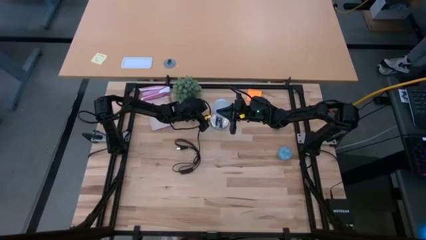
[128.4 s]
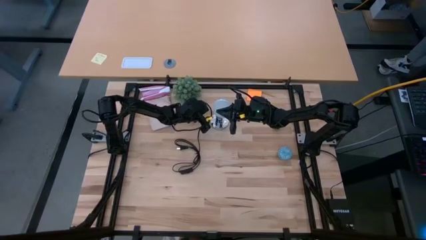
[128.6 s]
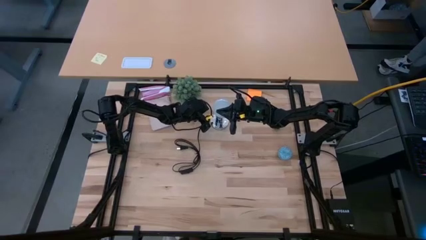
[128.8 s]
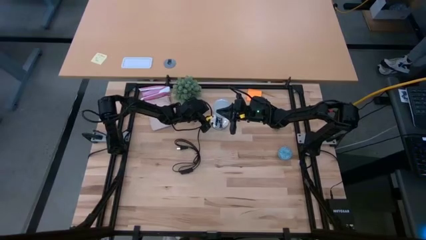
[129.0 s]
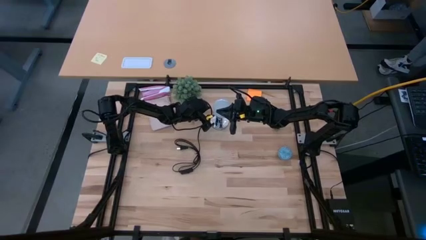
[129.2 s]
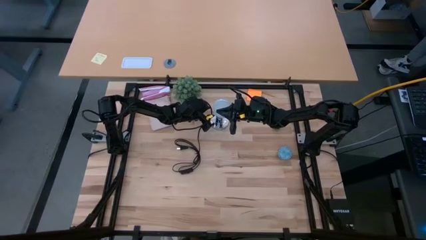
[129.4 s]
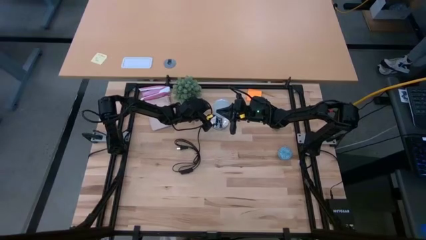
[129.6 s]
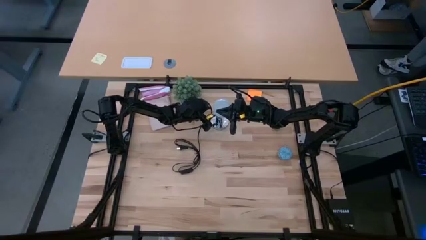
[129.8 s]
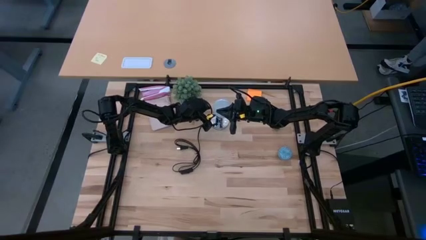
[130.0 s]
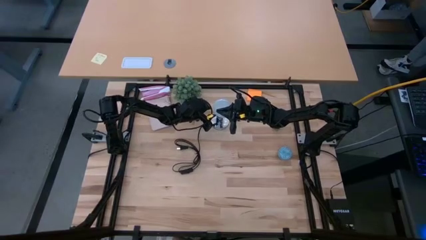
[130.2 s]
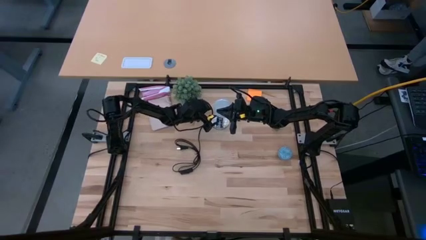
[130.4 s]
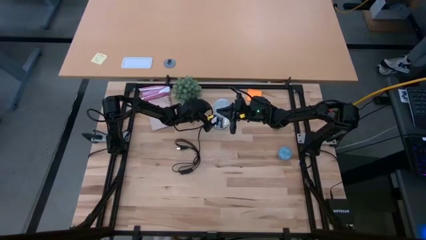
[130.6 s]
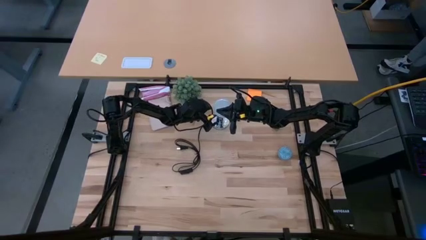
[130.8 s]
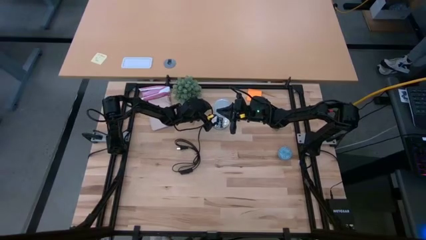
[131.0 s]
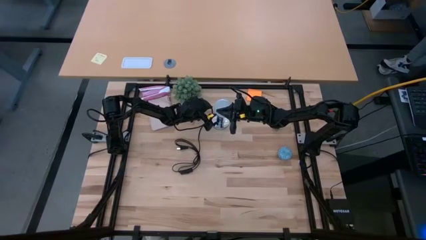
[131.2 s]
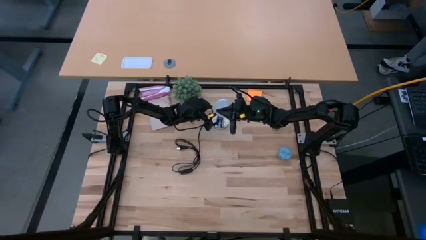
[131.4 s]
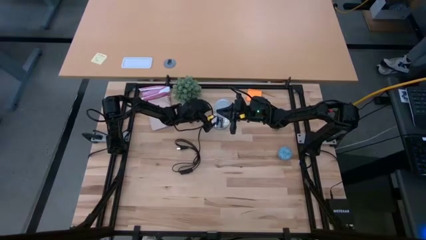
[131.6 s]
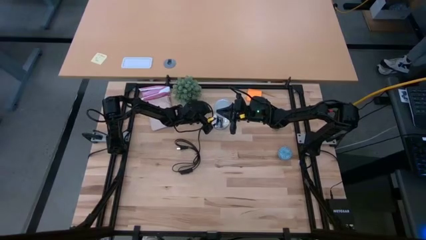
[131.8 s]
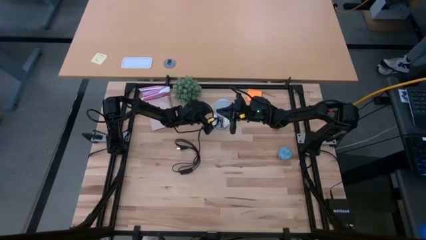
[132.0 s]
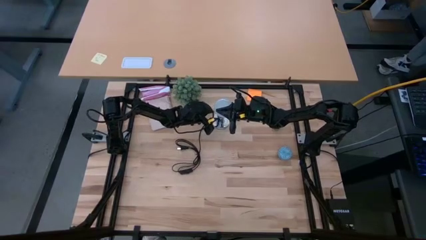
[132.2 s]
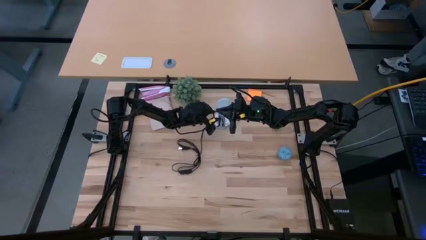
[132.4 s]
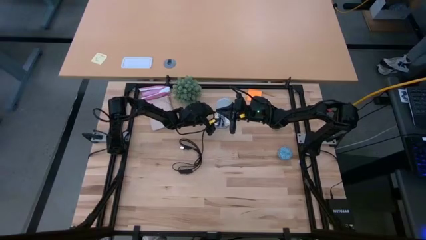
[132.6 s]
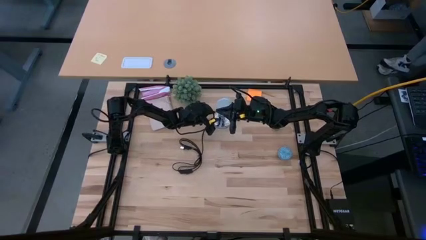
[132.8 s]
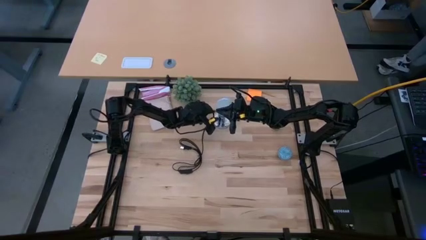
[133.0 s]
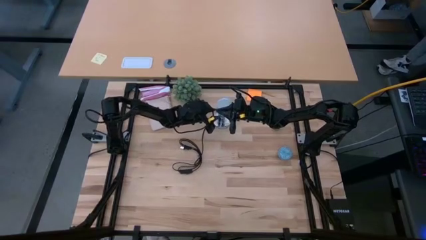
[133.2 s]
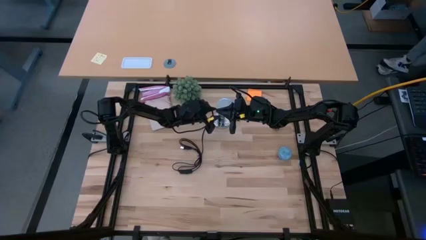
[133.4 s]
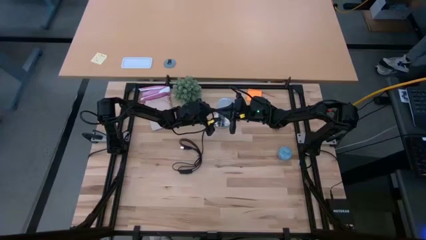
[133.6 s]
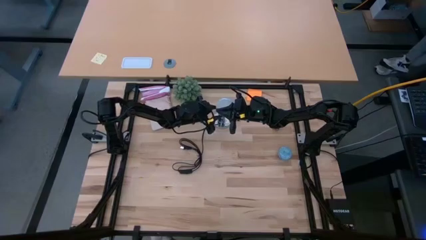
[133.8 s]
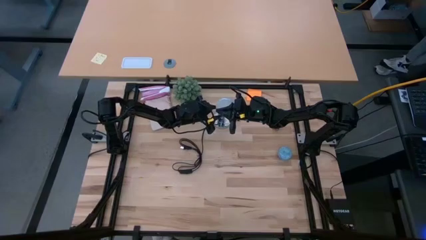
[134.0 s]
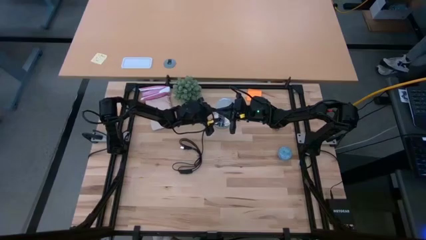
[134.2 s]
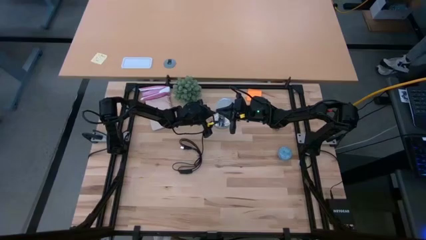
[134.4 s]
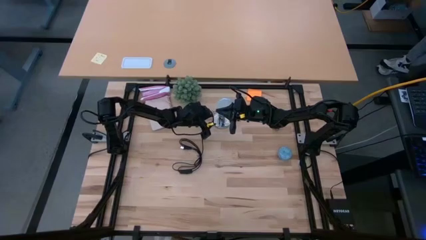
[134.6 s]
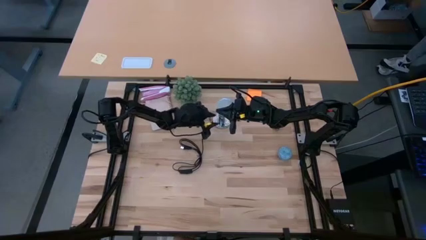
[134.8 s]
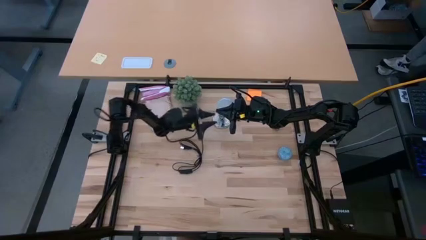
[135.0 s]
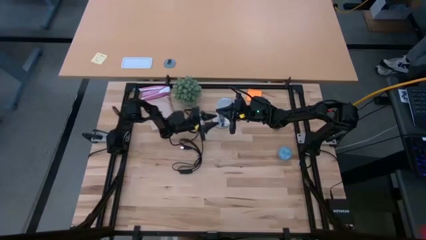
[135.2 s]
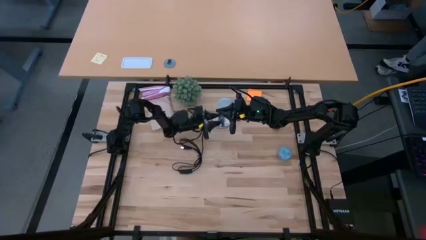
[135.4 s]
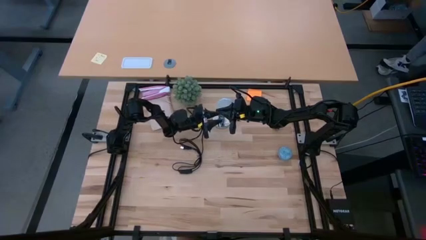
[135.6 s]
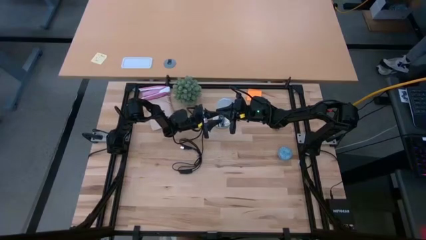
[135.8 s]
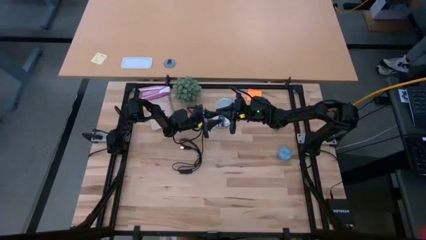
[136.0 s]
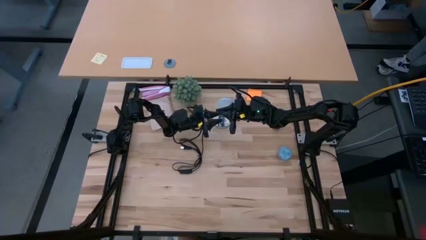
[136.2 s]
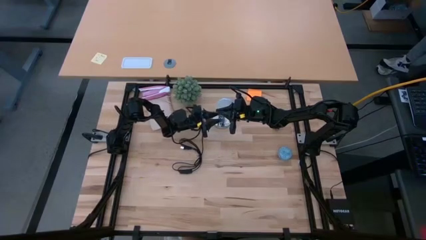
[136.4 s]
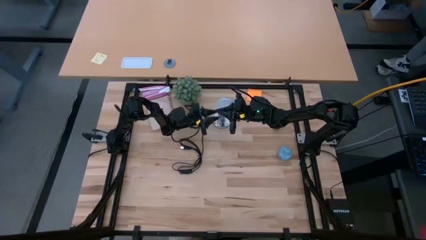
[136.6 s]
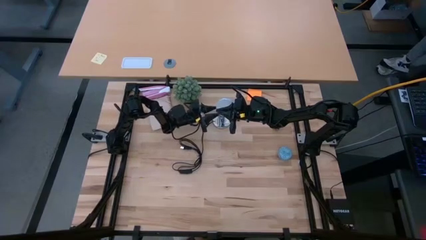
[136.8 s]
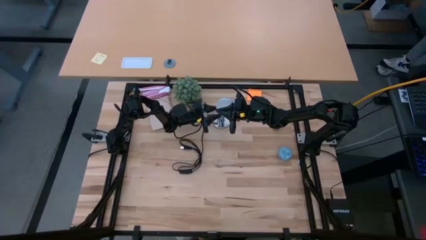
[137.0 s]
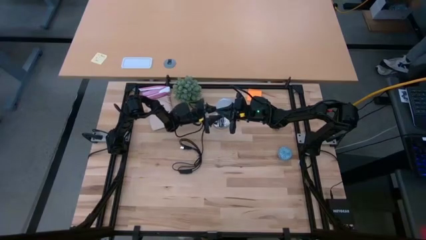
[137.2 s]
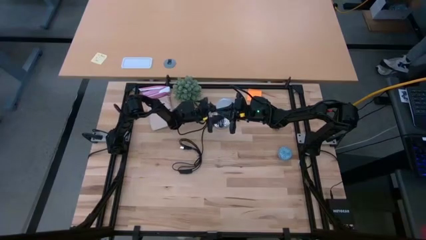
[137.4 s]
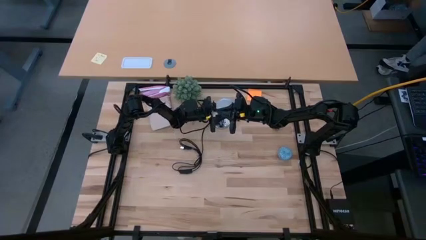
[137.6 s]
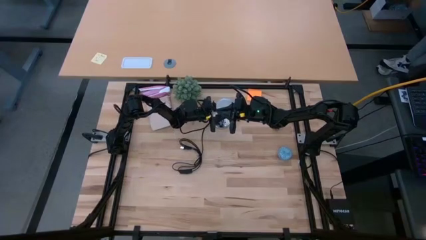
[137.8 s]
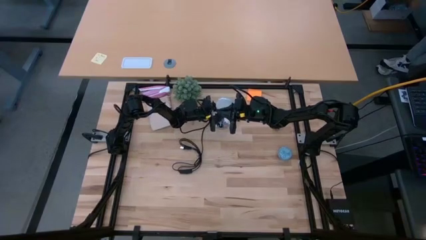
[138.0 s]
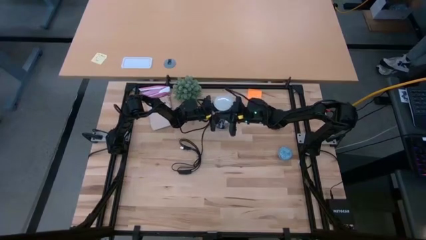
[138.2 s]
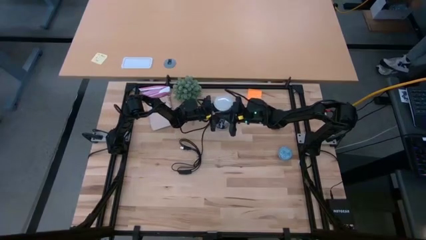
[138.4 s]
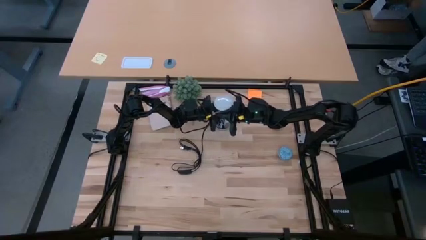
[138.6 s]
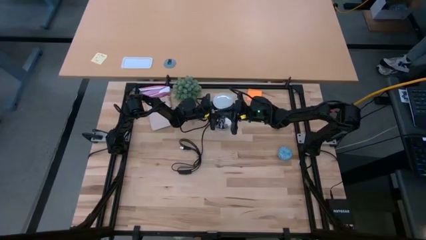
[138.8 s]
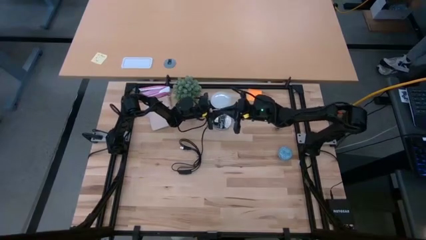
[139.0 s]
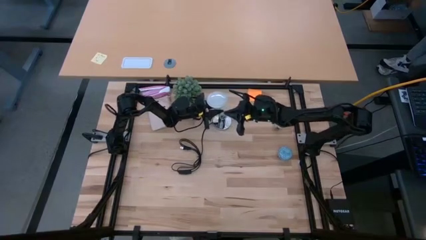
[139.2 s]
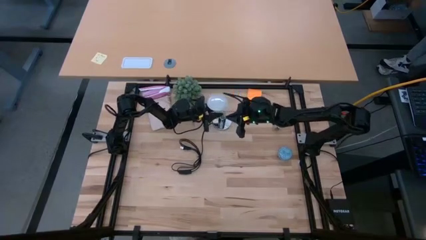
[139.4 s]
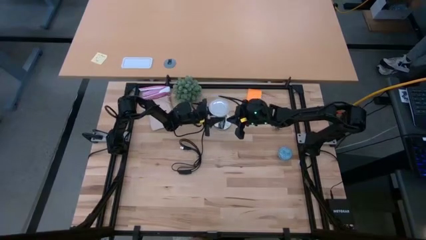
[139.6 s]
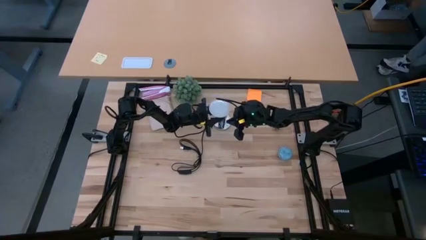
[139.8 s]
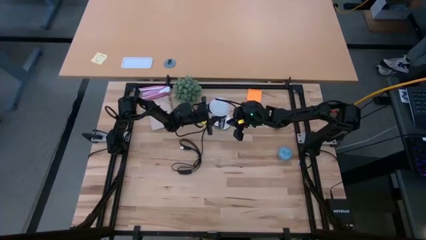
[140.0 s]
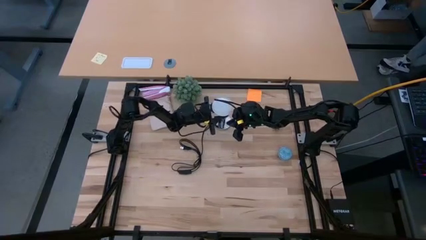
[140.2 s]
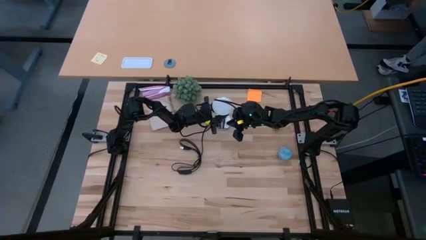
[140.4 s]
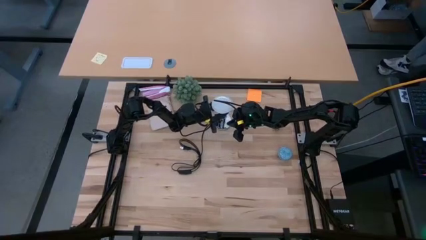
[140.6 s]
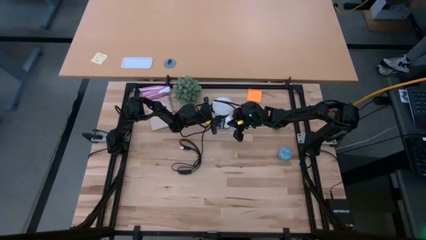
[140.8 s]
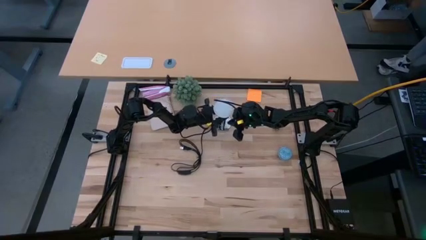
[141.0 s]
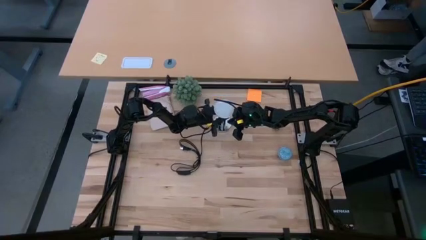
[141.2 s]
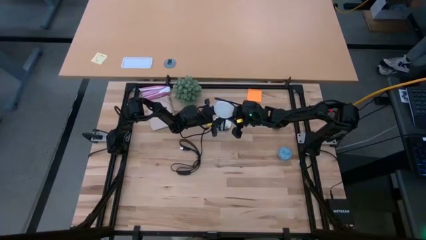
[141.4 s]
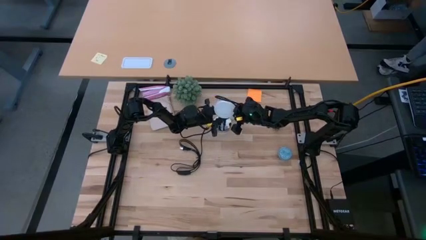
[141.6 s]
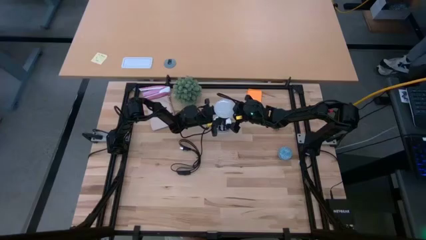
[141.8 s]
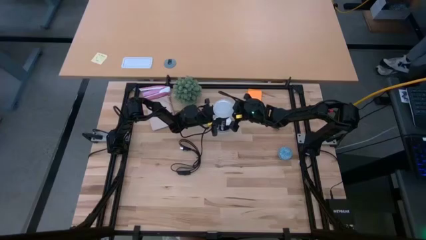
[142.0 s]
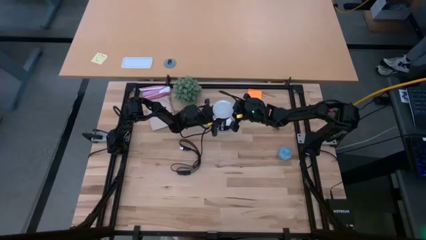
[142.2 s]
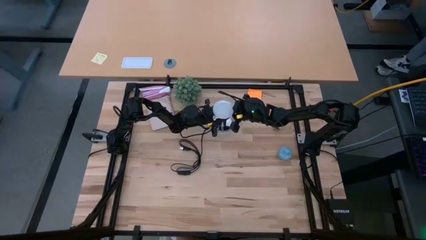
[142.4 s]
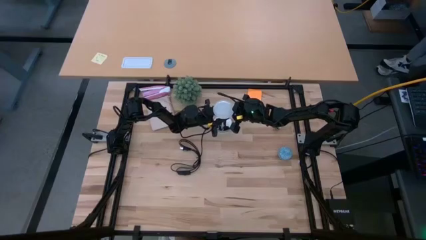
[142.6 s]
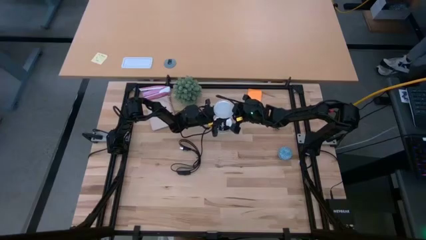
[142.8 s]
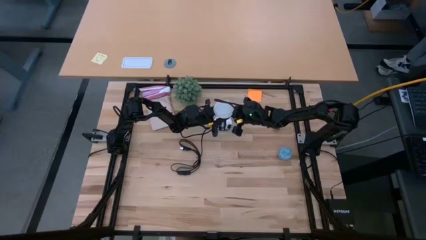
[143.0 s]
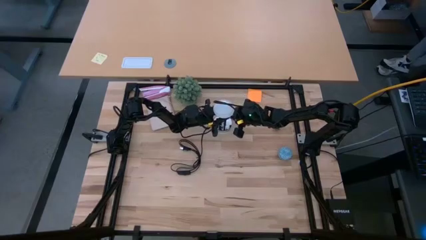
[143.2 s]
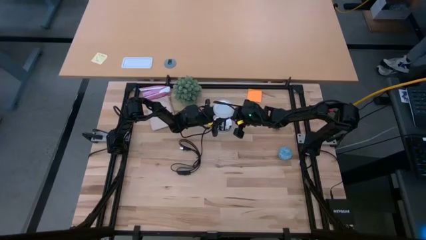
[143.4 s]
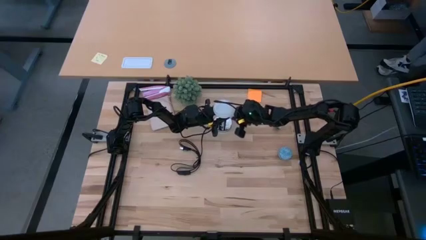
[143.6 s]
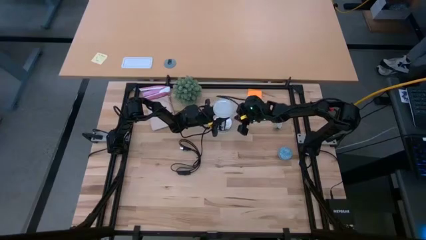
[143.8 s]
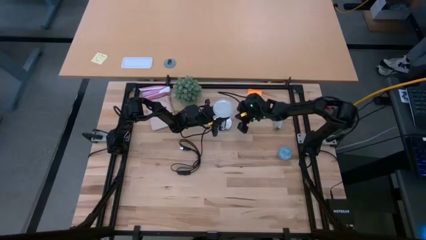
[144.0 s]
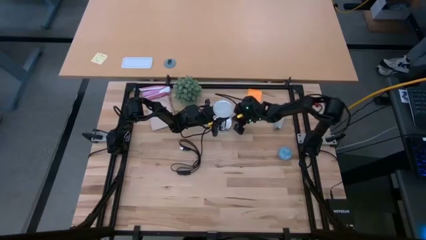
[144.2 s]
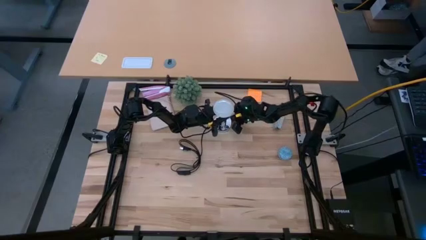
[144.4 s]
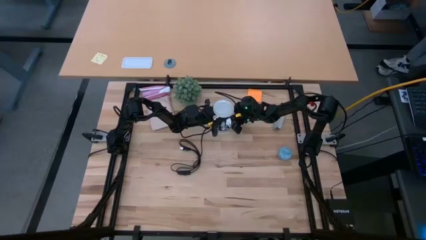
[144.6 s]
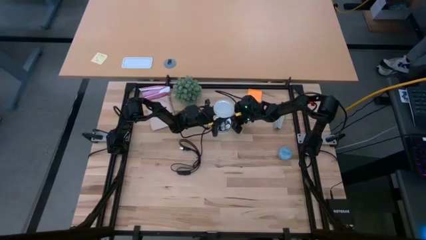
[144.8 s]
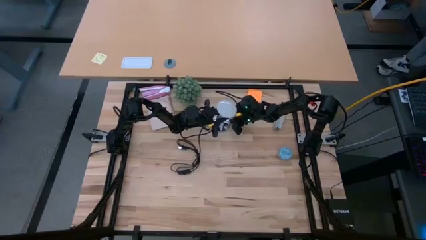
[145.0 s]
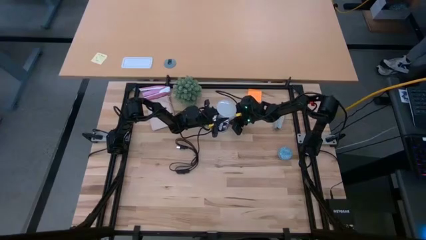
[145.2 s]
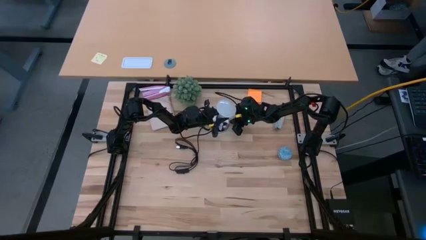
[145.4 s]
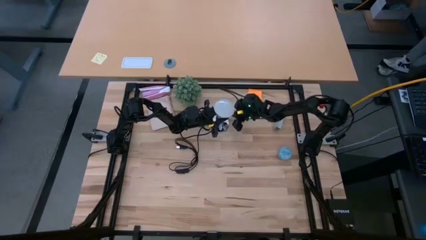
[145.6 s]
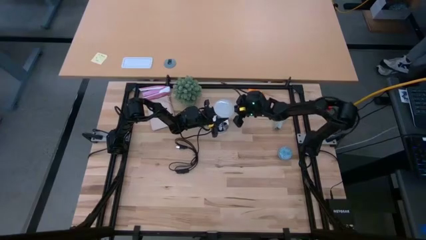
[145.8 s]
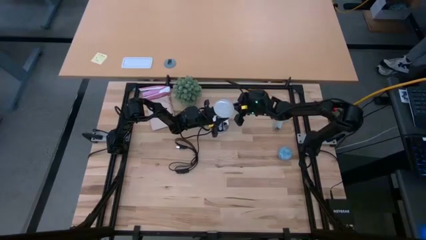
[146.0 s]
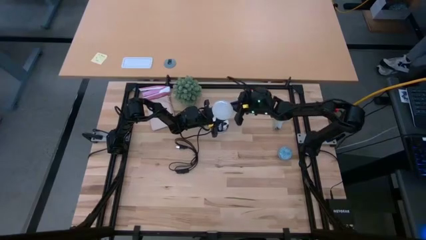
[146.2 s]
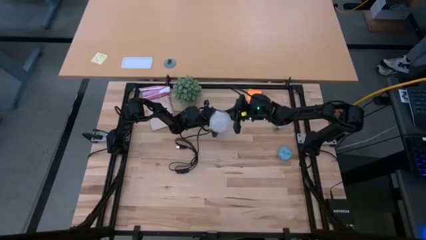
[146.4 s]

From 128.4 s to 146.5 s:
Task: Screw lightbulb
Insert the lightbulb into the lamp
